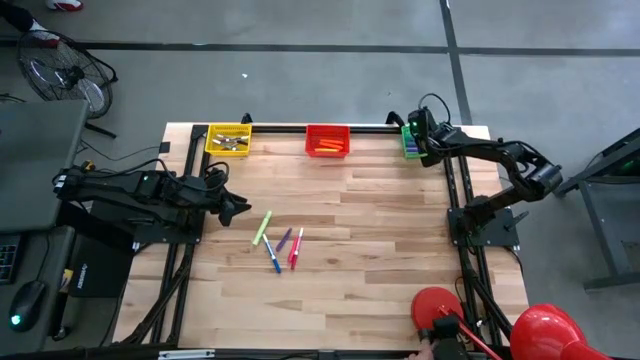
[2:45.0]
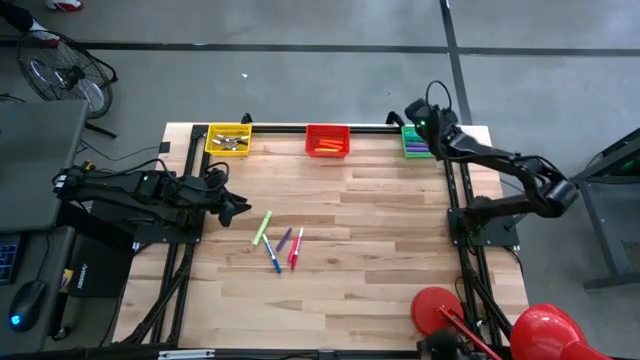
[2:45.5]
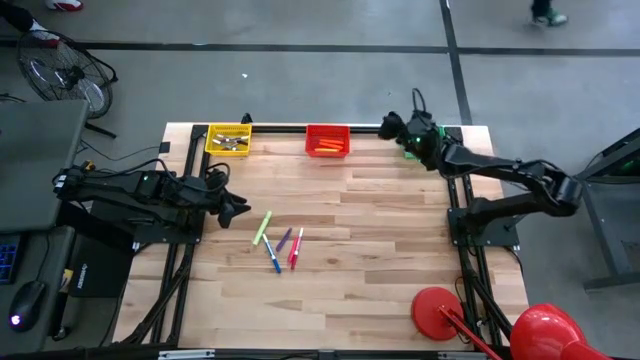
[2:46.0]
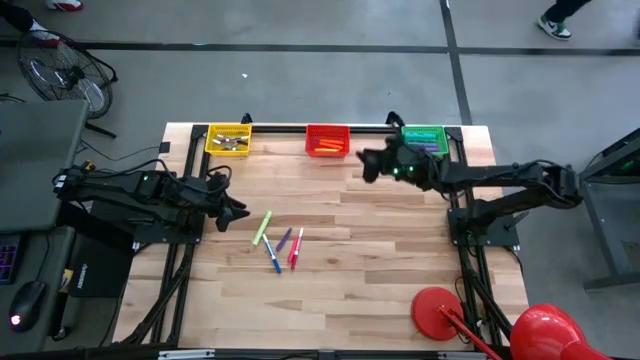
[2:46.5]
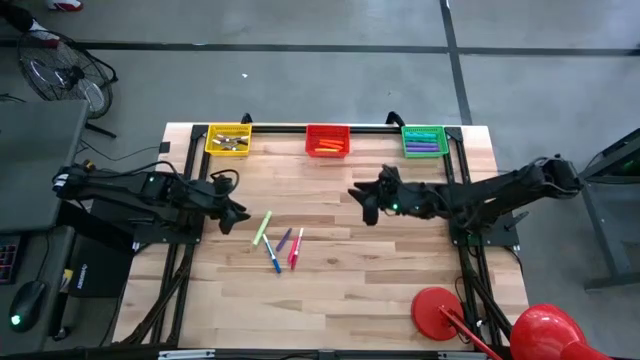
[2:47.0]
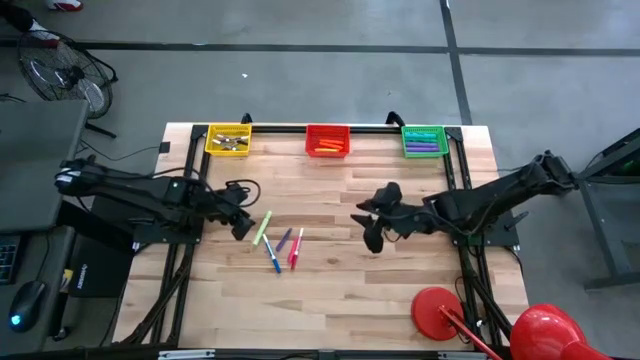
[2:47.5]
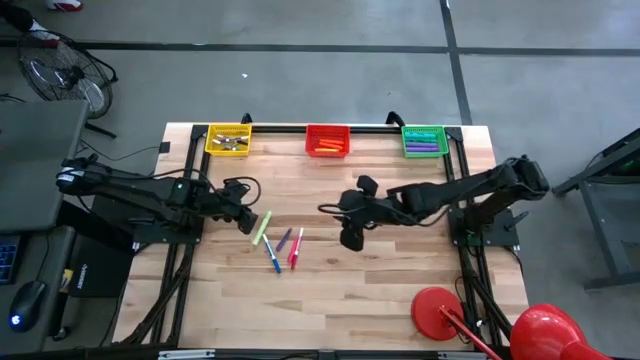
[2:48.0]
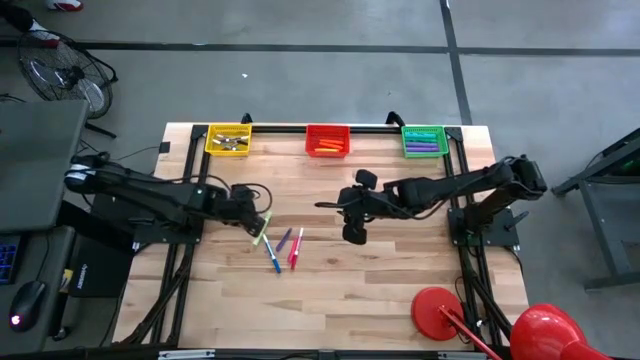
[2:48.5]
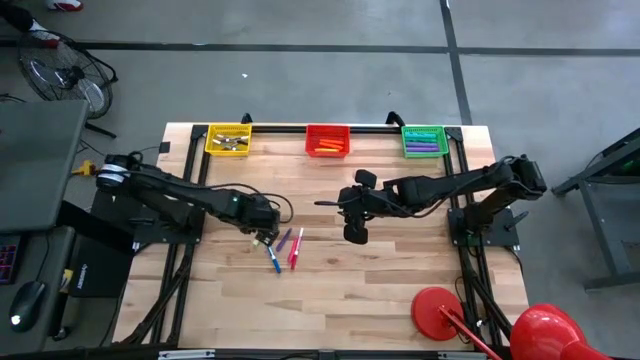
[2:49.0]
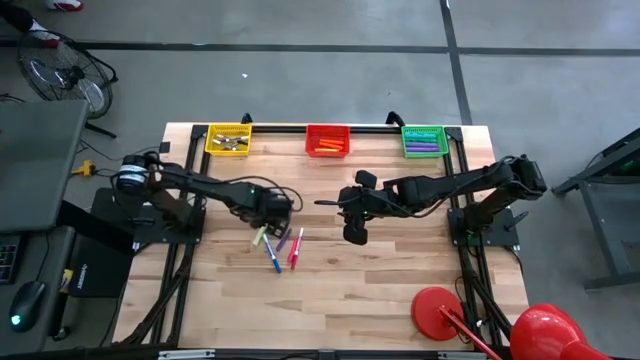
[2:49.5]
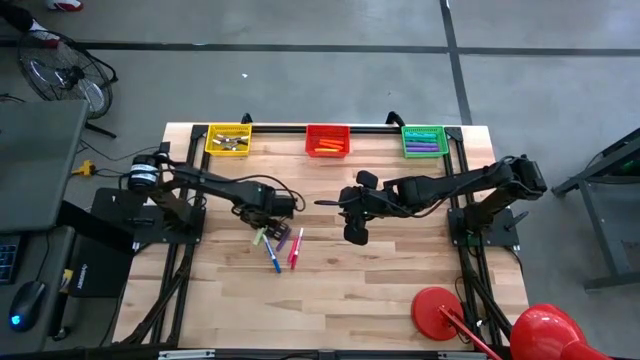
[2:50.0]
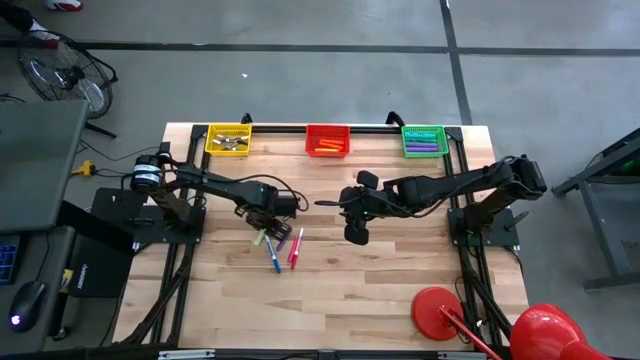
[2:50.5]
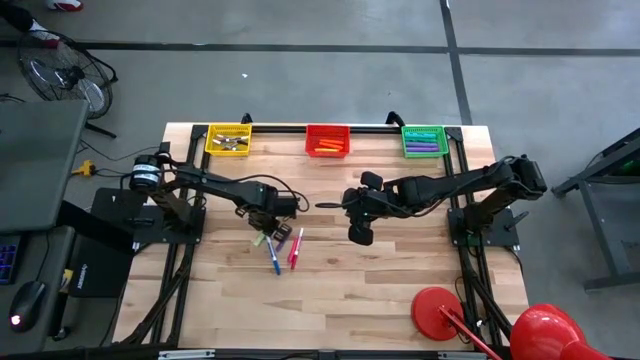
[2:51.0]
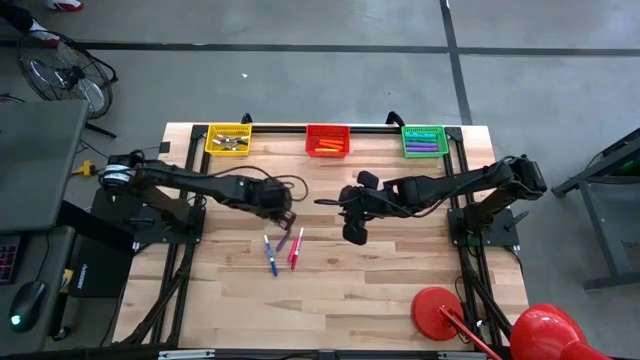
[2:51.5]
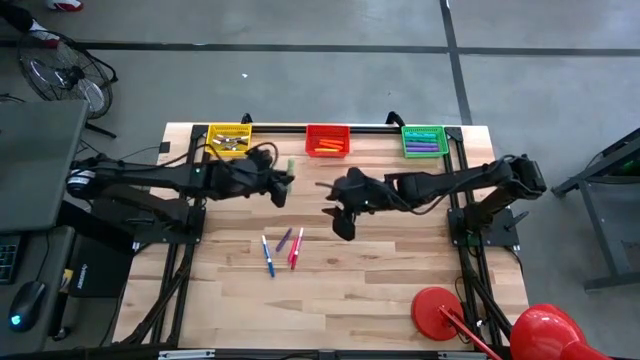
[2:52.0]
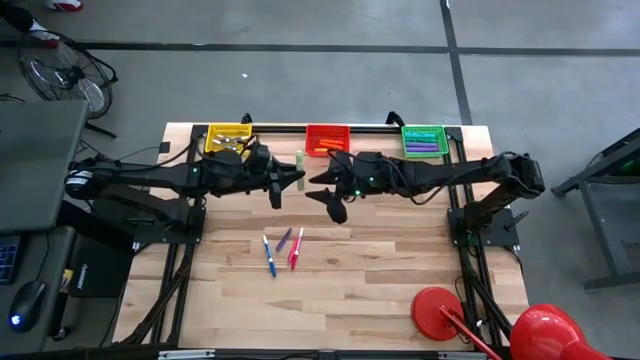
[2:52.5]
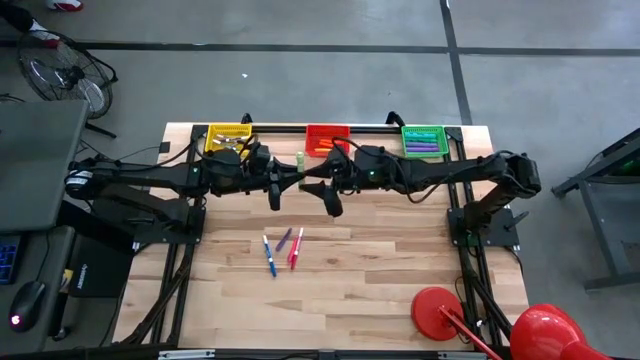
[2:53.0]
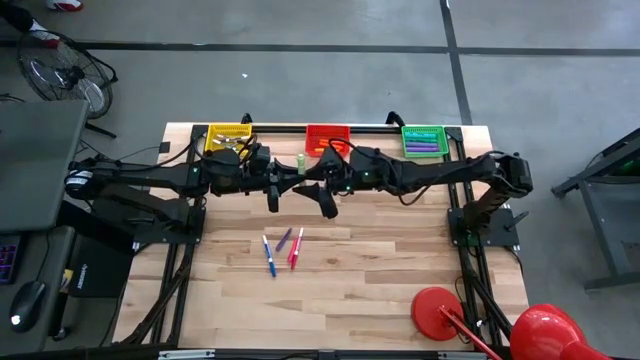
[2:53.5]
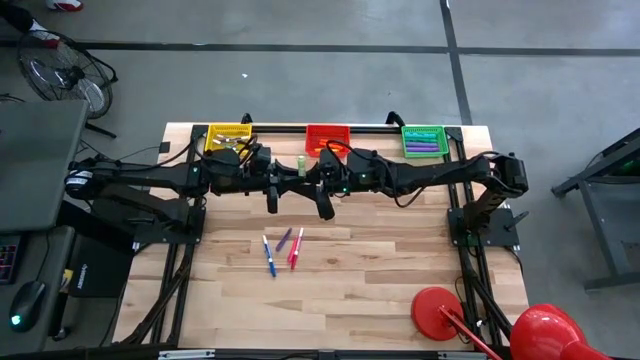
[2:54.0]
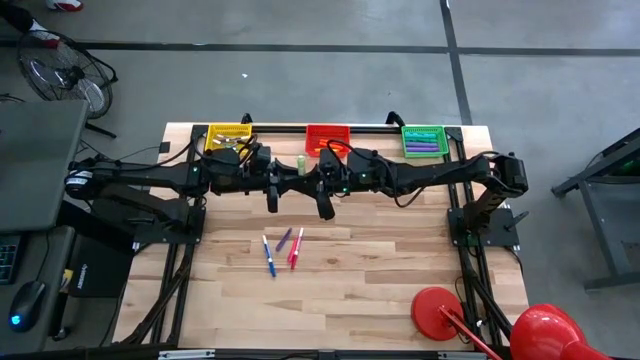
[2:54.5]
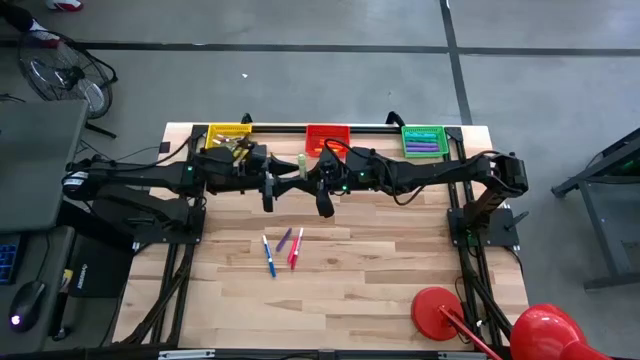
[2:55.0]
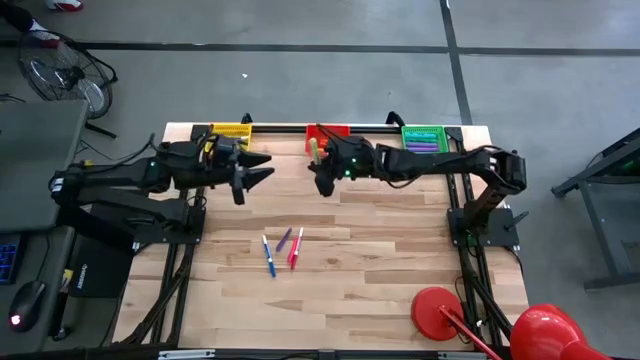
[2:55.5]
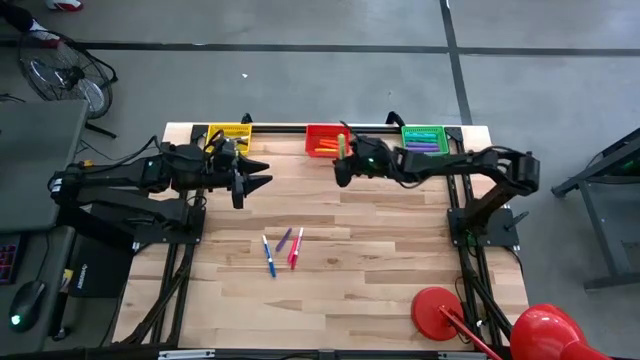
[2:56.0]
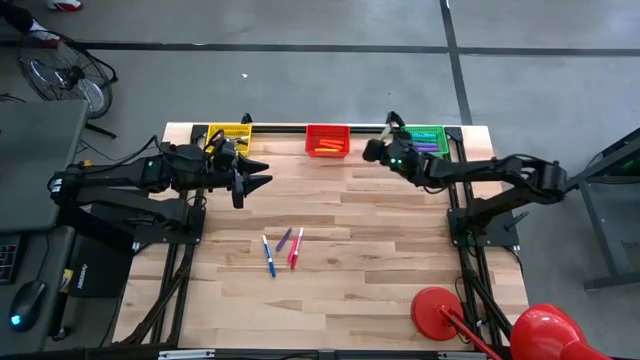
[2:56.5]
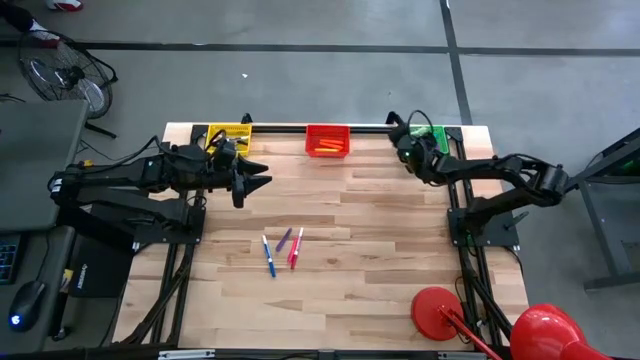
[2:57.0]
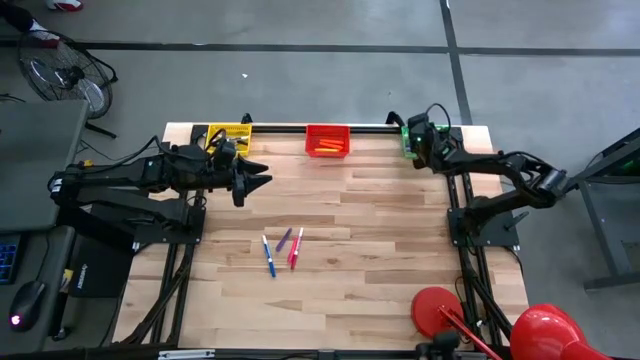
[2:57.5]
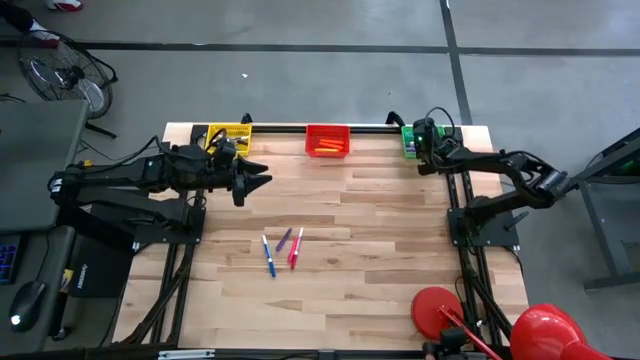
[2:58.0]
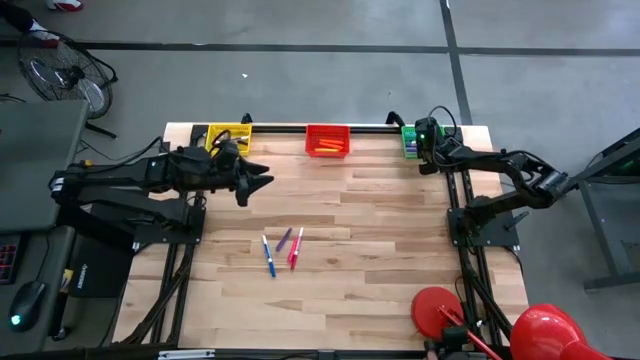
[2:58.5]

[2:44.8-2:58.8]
Task: Pick & Place Markers
Put the light green highlighter into the green bin

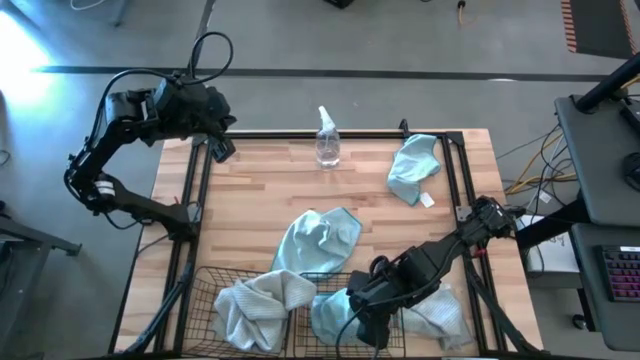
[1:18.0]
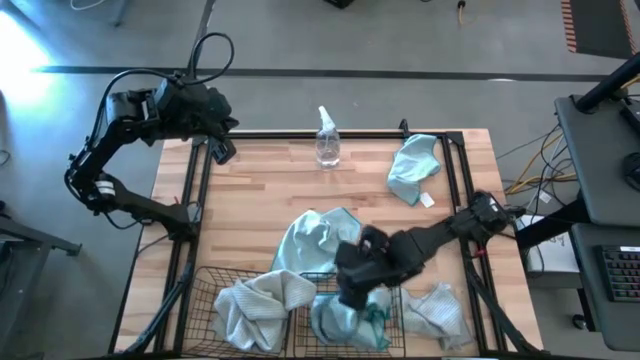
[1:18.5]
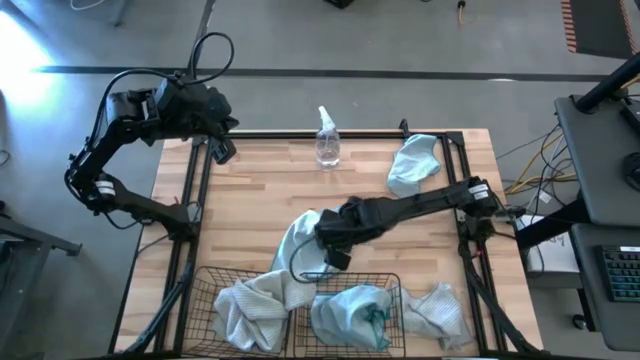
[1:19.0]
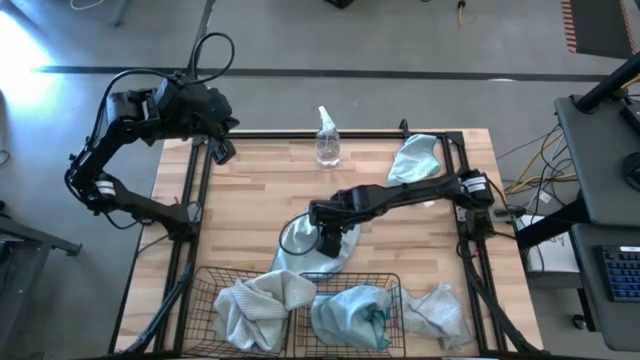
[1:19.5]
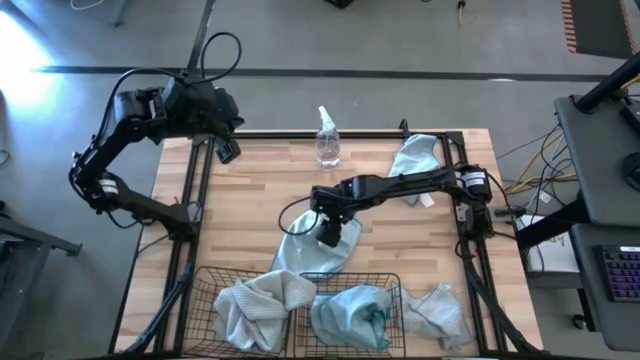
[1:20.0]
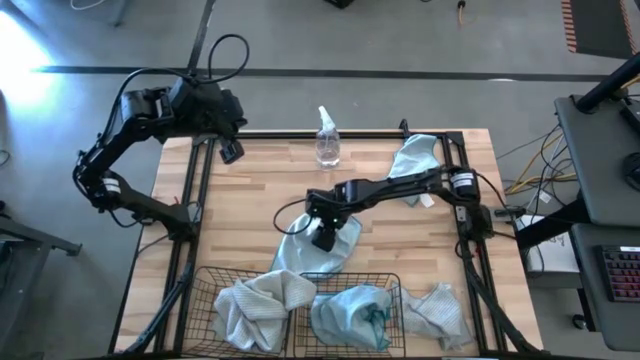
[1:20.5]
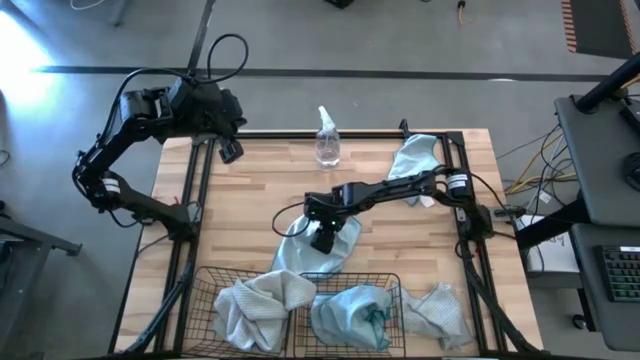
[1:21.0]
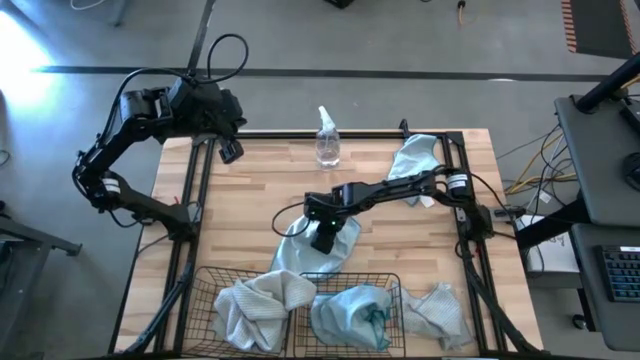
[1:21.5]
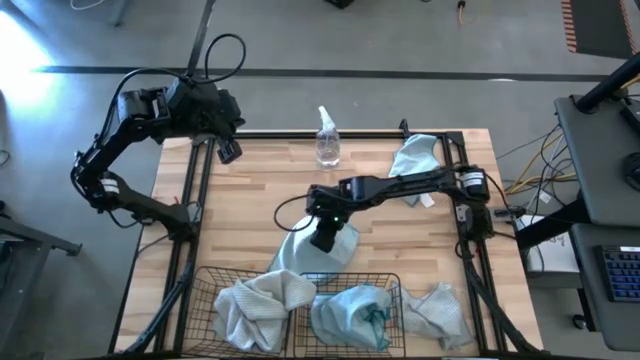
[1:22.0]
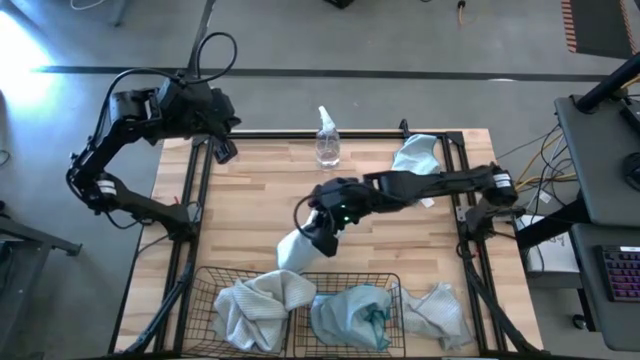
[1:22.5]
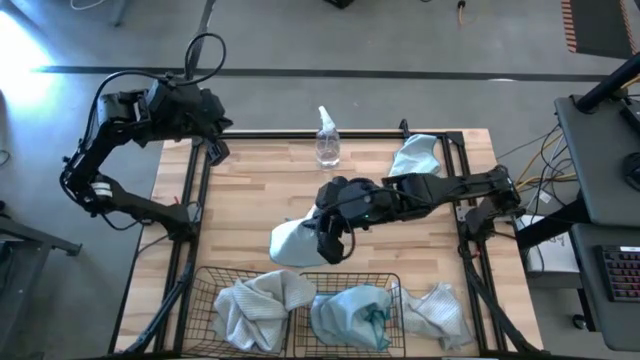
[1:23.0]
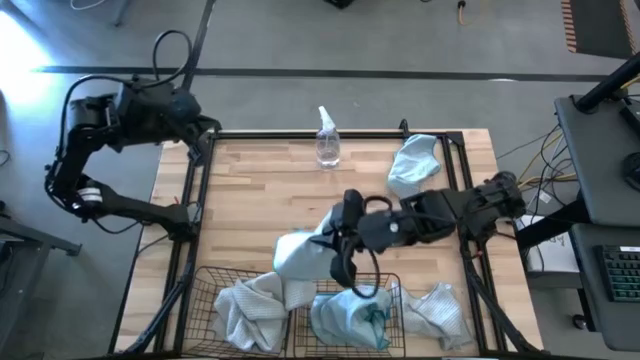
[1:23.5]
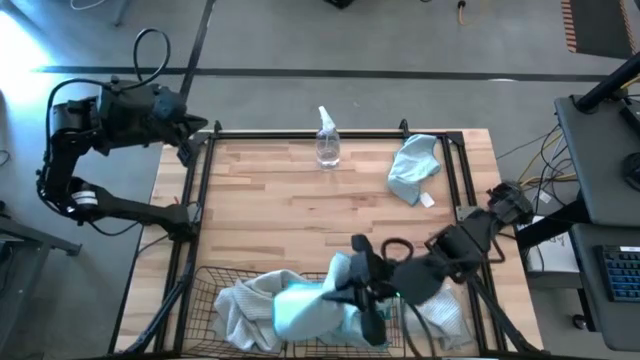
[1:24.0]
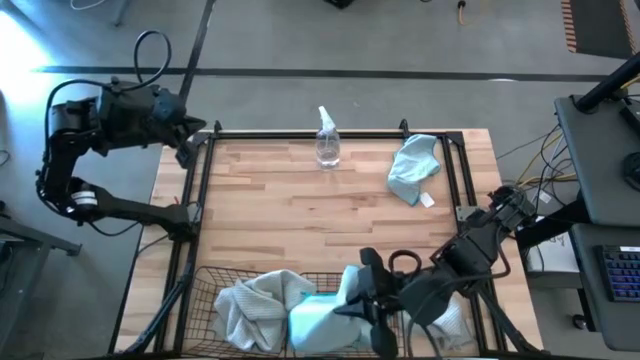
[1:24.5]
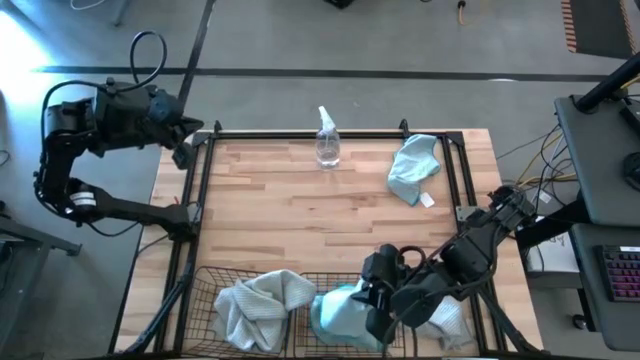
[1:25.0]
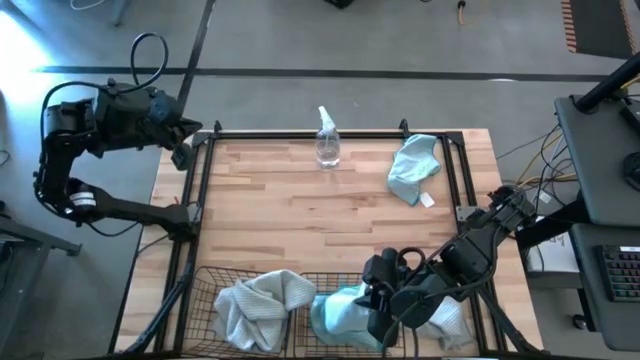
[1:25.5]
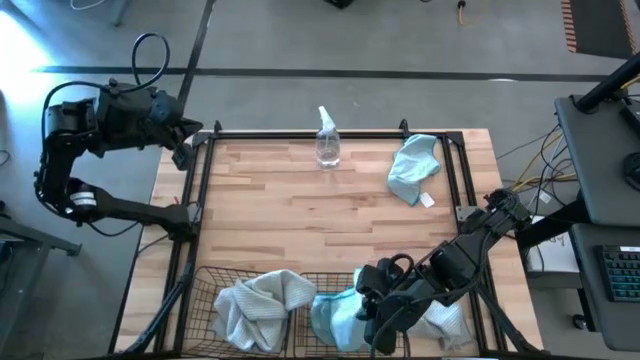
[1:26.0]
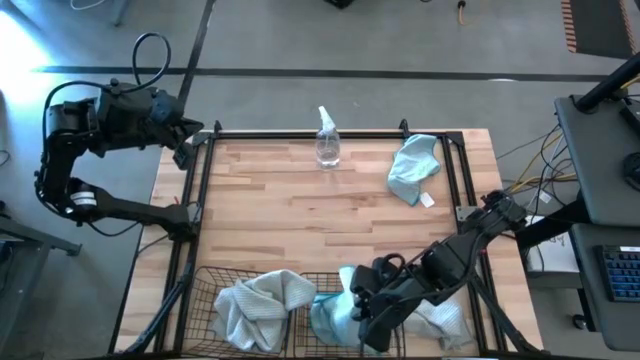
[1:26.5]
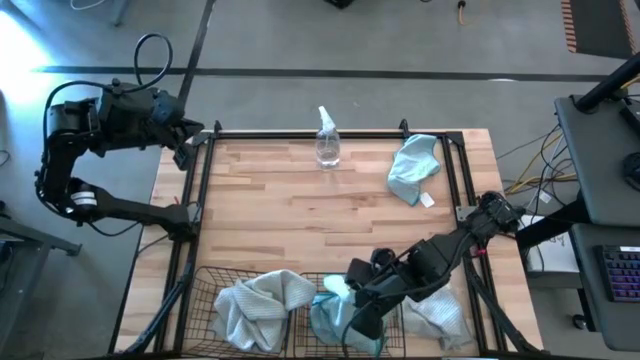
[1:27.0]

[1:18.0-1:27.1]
Task: Sort microfiber towel by color & place in baskets
Put the bottom blue microfiber towel into the right black wire basket
